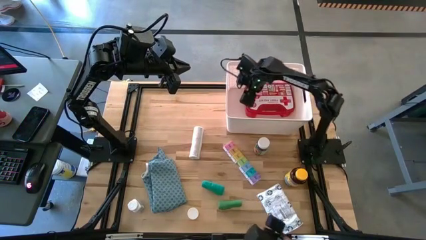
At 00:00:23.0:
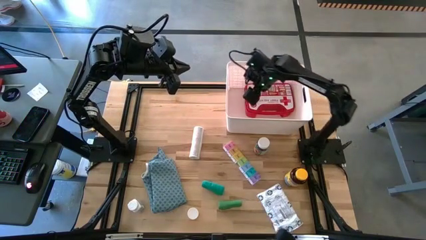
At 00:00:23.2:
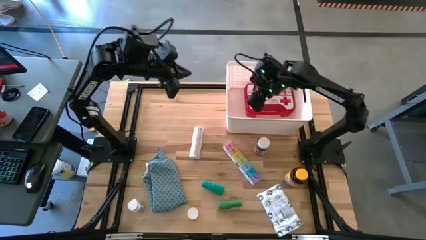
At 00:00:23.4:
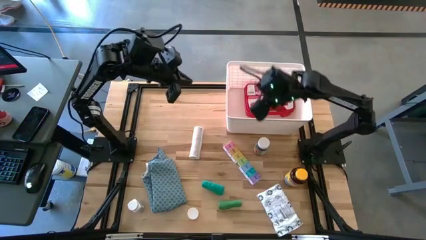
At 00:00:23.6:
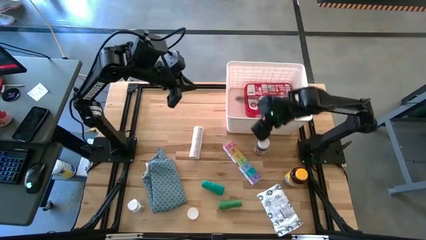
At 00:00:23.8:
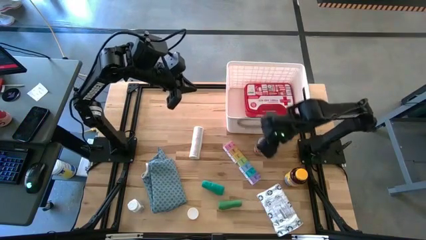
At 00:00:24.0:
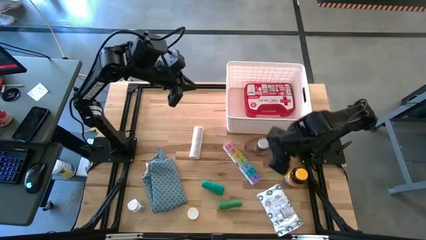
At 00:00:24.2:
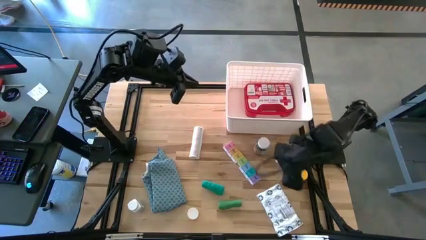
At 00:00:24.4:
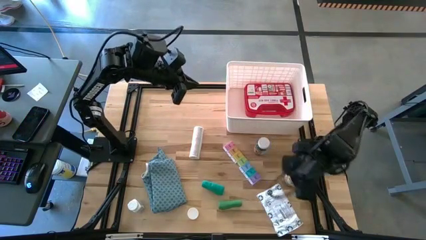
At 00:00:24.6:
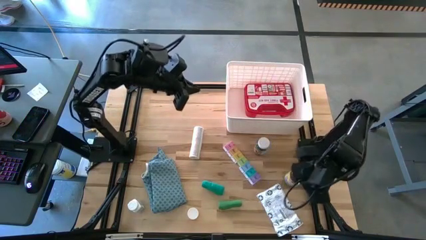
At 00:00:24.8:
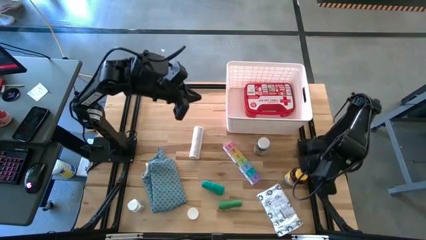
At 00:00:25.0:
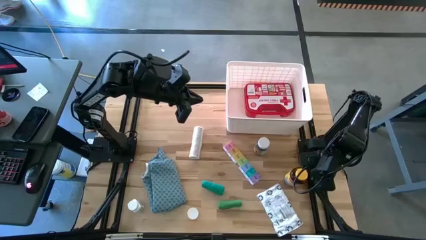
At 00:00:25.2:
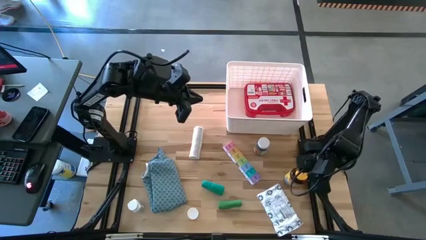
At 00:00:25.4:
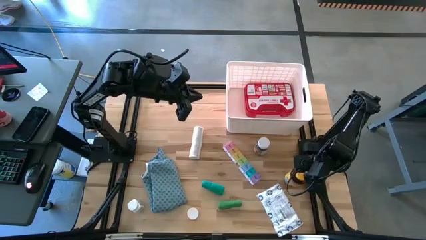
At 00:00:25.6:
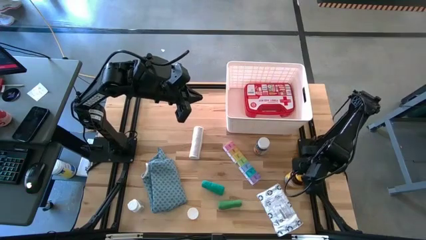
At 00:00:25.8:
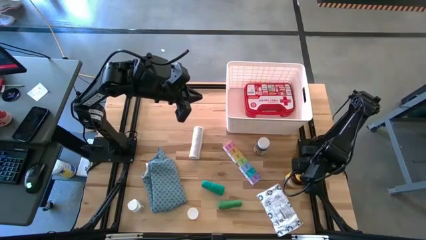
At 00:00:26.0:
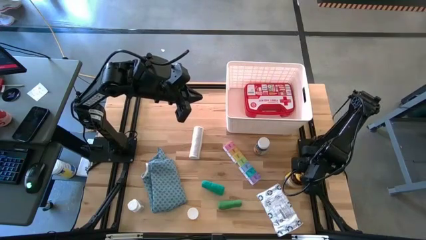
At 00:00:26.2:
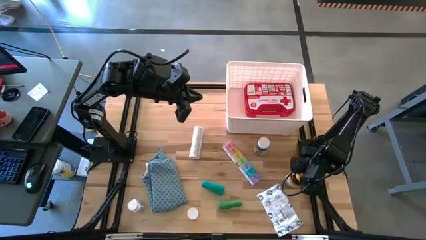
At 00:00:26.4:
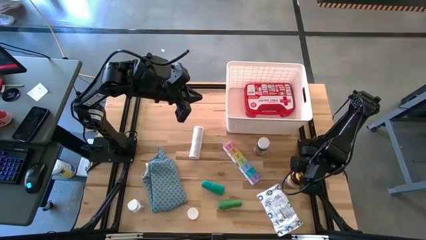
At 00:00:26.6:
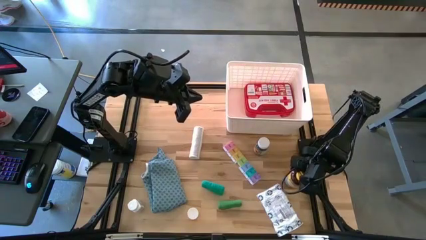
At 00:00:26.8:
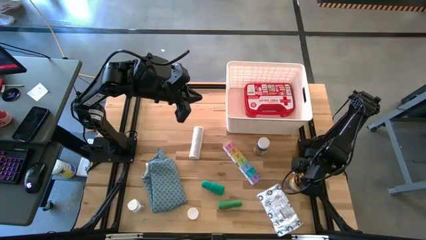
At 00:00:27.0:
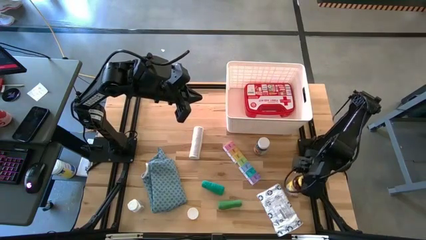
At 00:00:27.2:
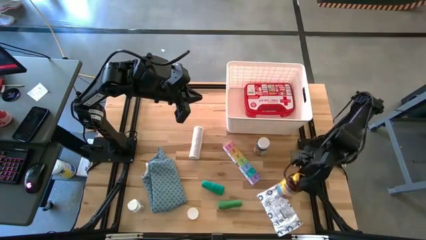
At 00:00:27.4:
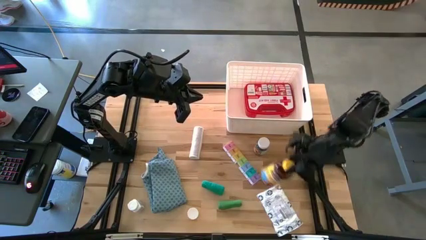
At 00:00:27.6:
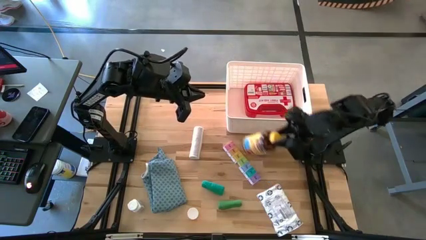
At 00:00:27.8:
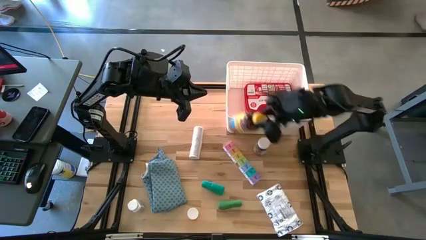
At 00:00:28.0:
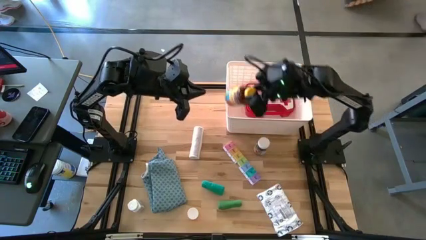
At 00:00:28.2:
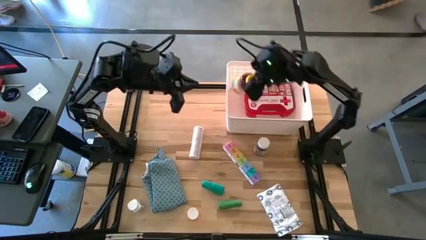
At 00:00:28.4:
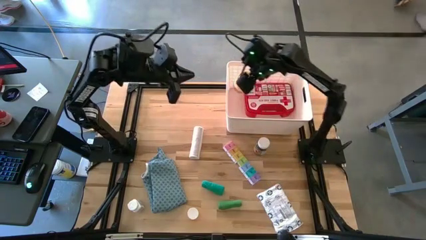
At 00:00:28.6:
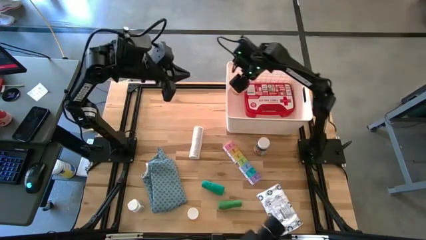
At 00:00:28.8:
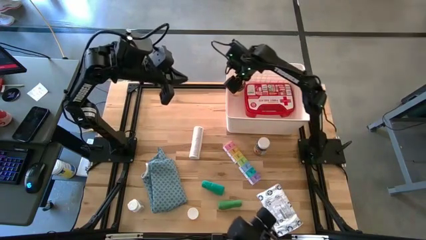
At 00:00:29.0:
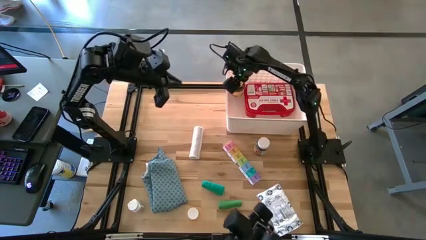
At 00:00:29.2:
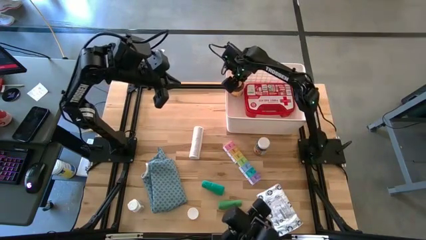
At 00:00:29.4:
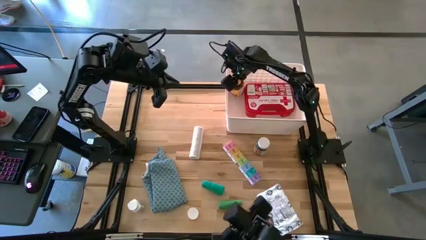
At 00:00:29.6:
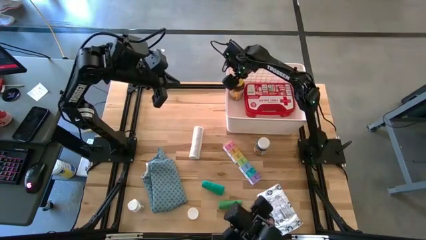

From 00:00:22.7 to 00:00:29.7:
Task: Pick & place medical supplies in basket/bin
Put the yellow pill bottle into the white bin

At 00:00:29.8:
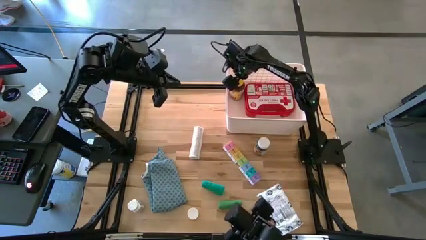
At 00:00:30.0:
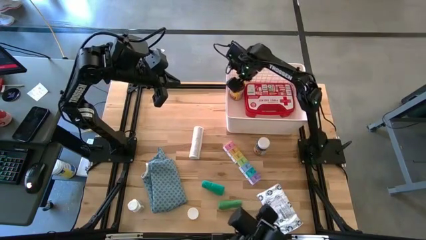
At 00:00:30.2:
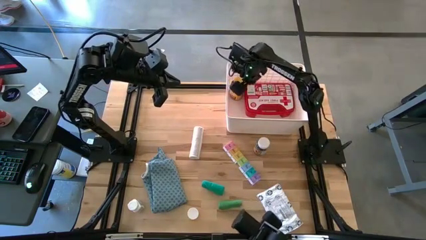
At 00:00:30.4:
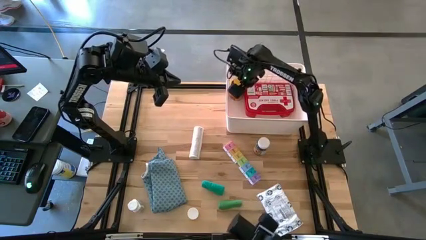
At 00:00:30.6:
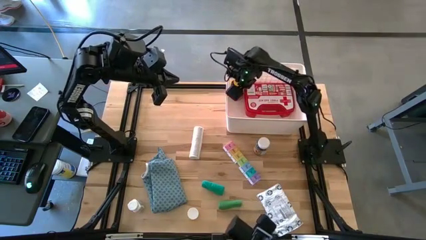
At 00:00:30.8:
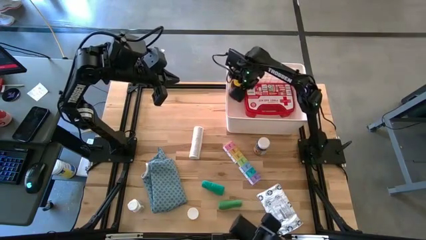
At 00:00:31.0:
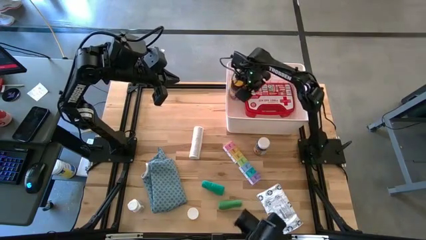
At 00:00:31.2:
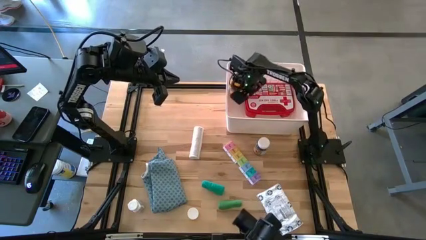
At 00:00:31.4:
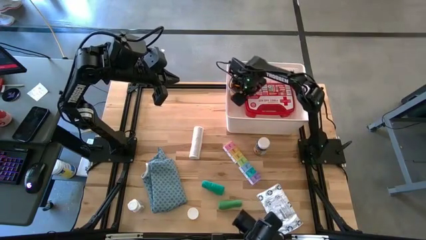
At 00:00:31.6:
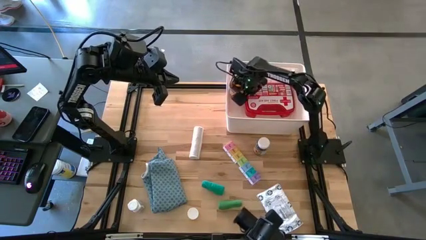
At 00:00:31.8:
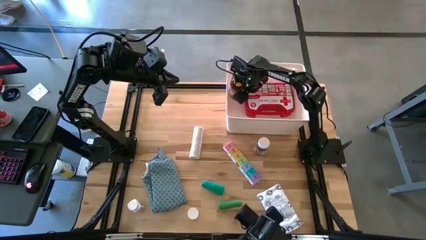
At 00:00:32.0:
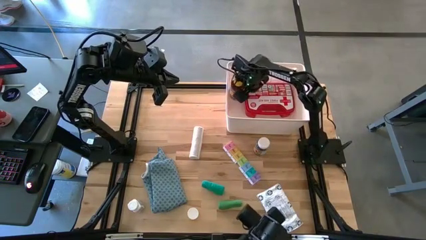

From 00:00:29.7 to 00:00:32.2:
Adjust the red first aid kit in the white bin

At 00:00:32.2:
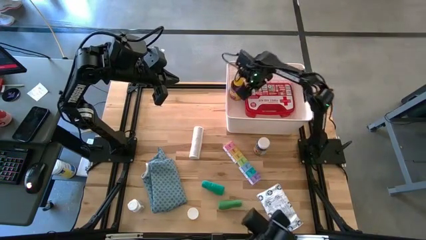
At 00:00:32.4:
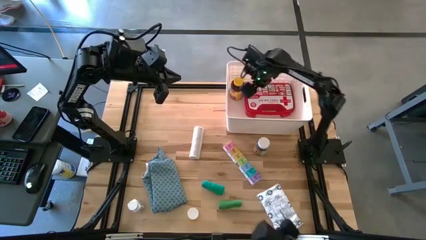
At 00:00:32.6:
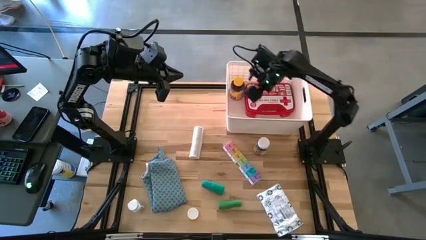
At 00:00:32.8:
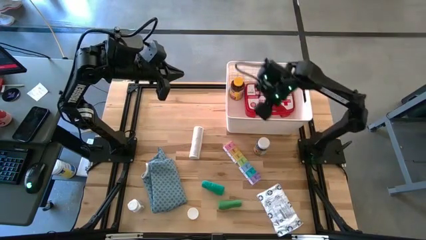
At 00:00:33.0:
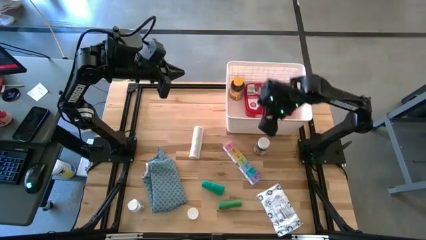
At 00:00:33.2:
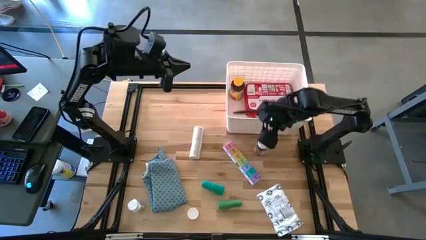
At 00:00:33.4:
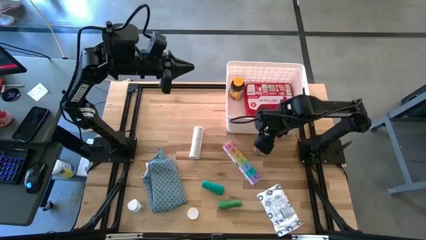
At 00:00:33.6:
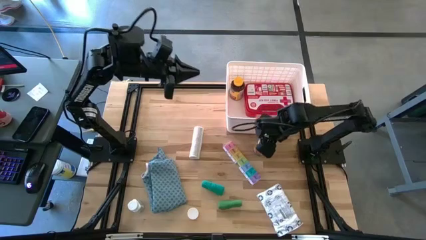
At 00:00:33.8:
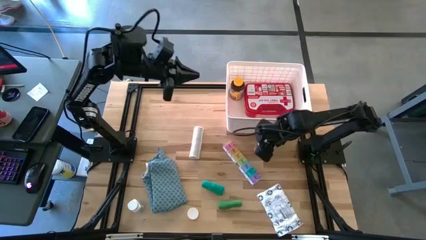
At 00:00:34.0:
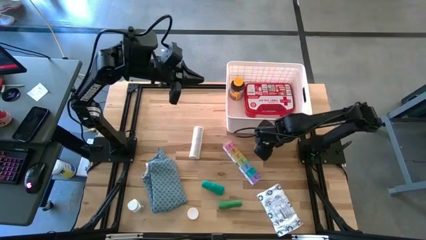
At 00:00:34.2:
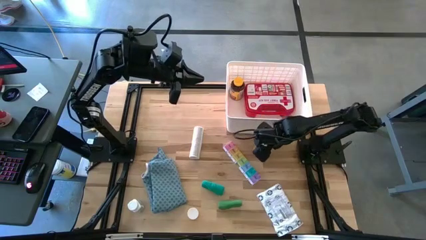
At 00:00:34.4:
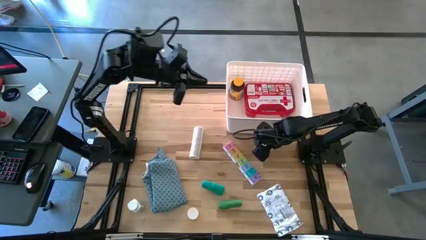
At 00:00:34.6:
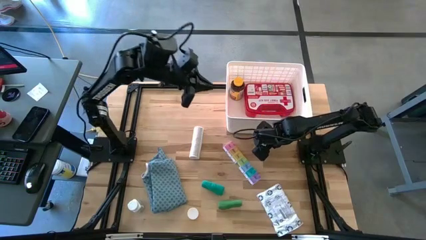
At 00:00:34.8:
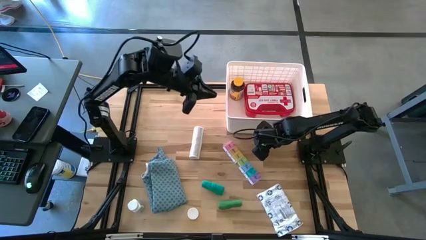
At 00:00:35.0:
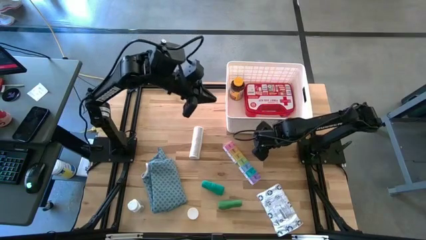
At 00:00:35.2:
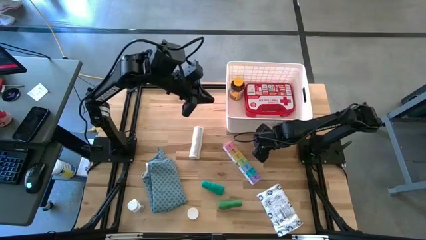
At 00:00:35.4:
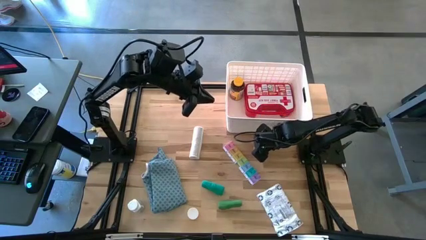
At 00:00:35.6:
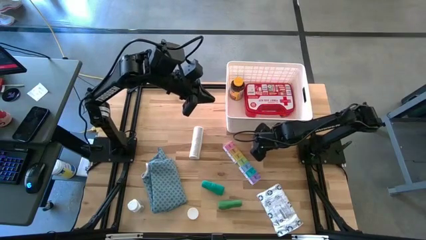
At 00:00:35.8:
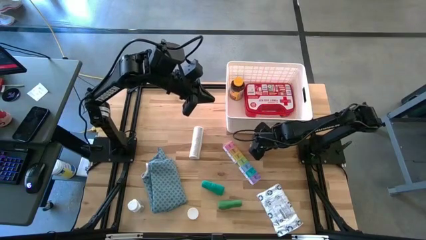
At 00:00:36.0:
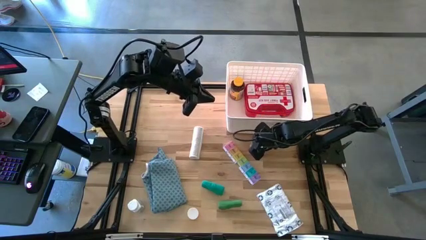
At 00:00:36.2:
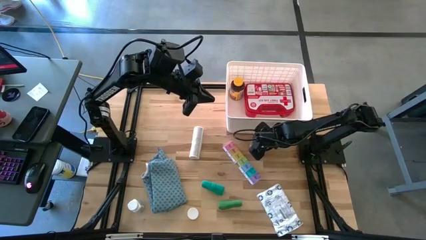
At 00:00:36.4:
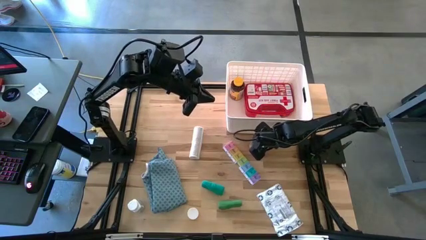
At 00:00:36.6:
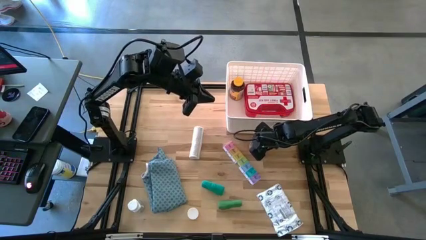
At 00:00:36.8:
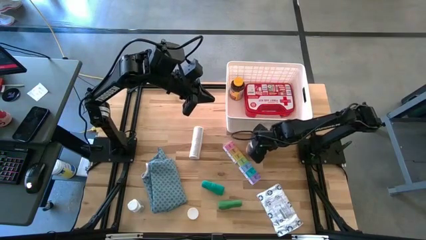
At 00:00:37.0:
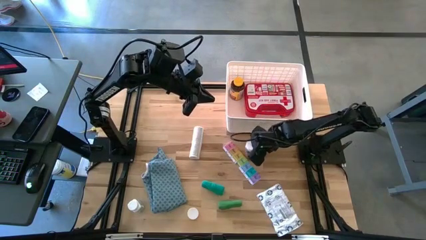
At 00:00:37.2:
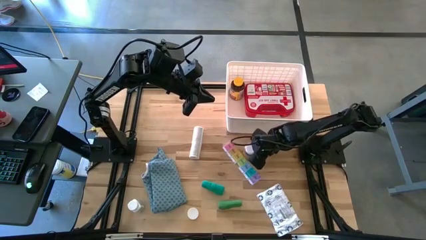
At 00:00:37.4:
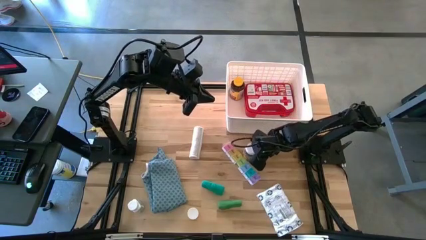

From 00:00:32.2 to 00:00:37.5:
Put the white and green pill bottle into the white bin
